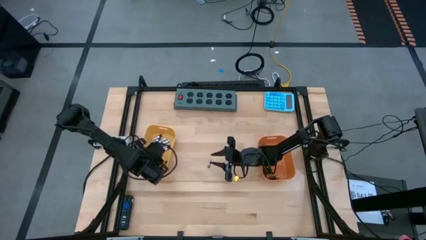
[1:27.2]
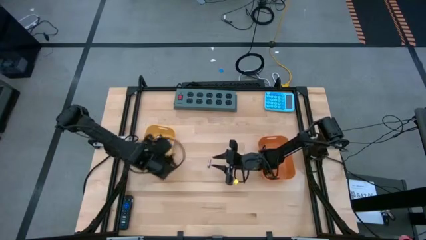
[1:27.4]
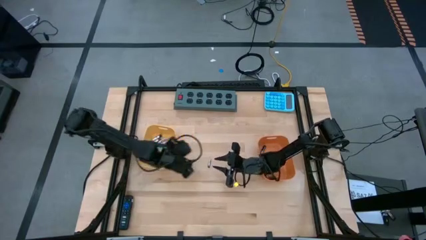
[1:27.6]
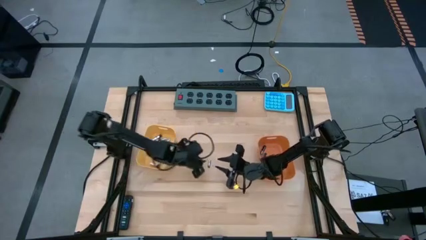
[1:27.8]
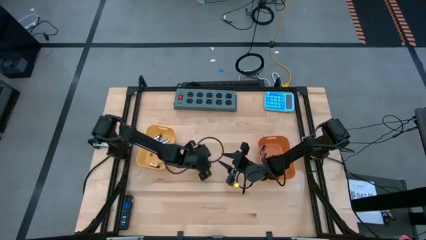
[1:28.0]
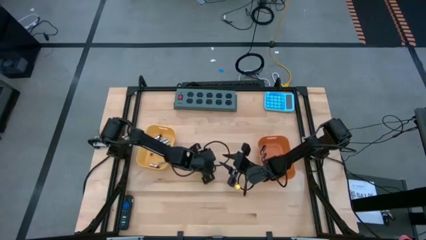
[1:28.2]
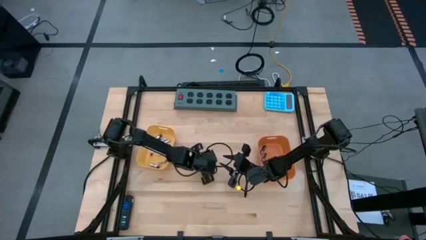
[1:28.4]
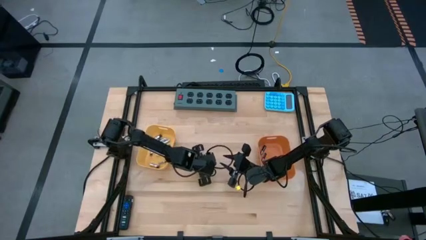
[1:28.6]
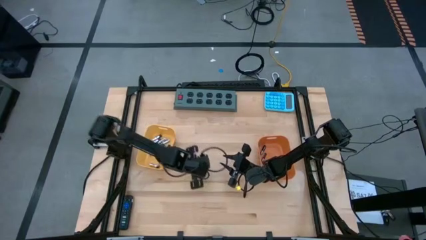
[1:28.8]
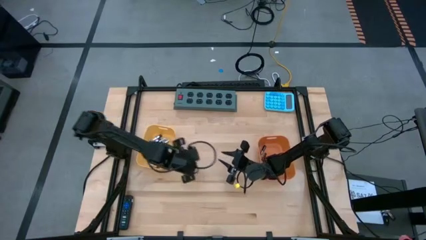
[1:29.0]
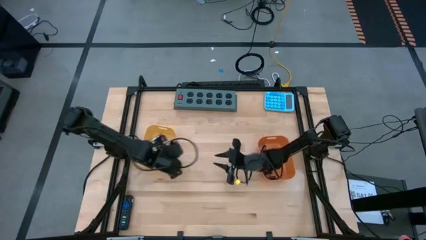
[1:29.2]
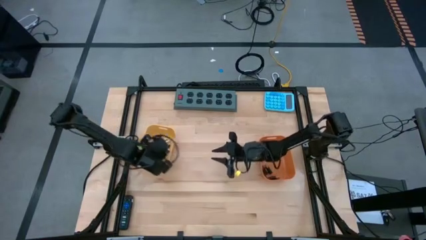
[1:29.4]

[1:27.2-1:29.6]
Task: Sort batteries
Put the silver battery into the yellow bin

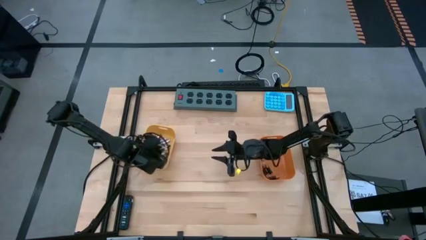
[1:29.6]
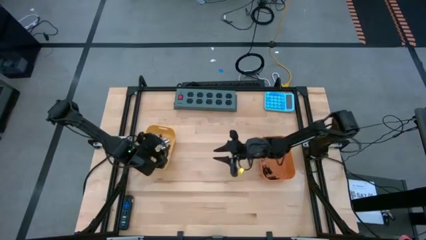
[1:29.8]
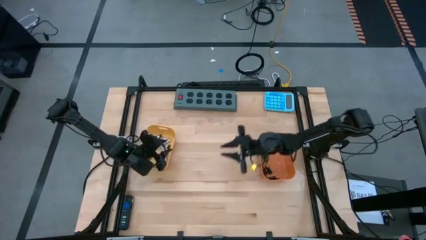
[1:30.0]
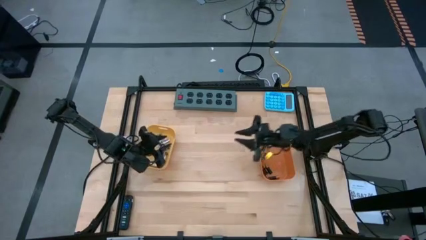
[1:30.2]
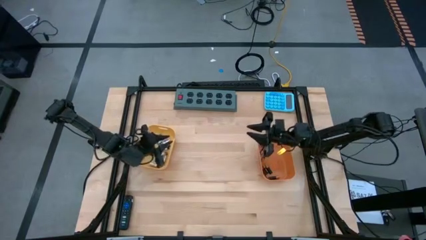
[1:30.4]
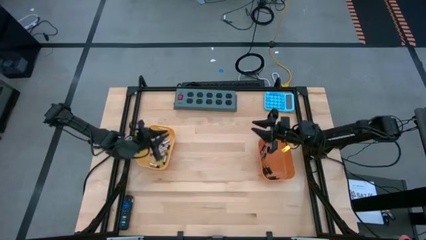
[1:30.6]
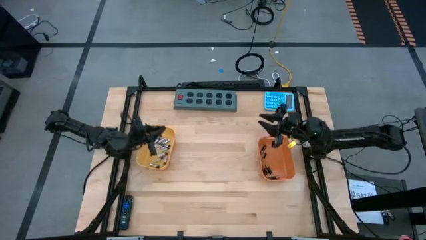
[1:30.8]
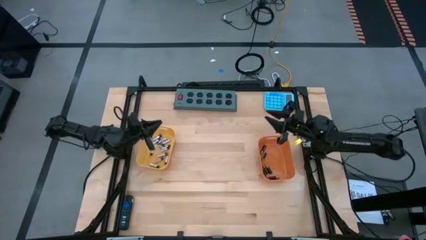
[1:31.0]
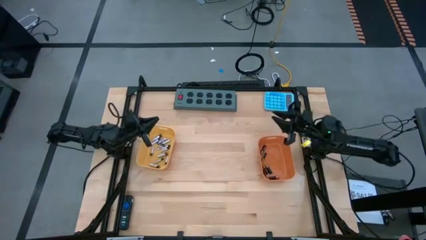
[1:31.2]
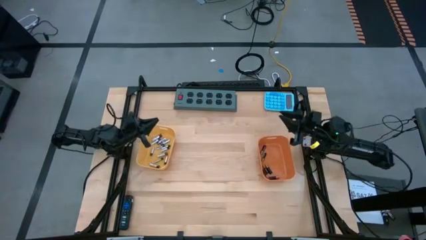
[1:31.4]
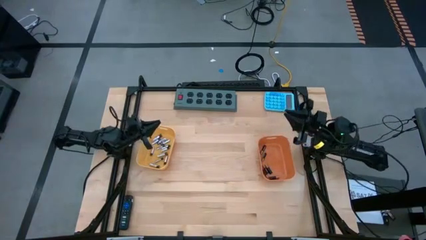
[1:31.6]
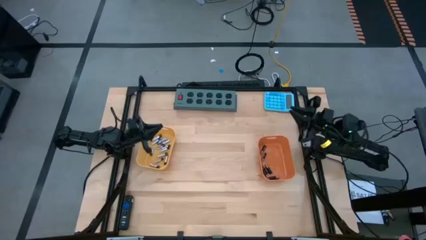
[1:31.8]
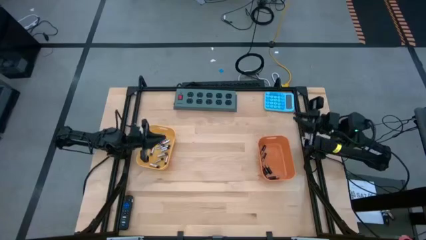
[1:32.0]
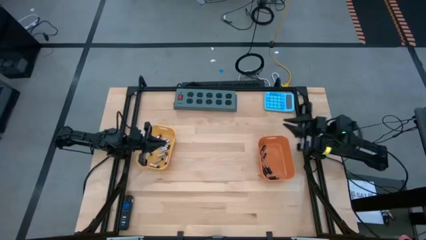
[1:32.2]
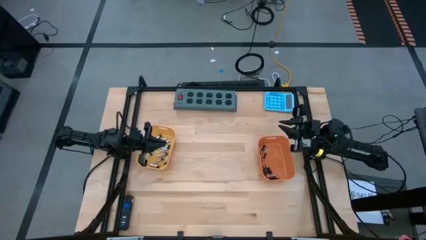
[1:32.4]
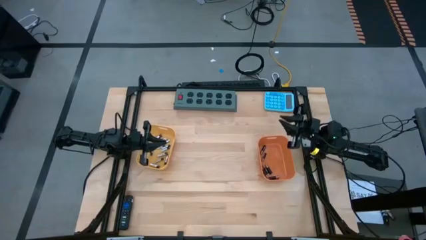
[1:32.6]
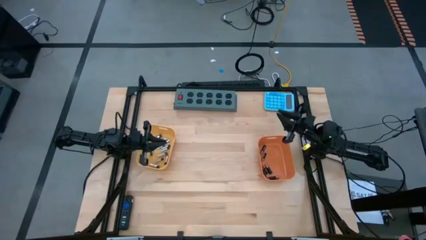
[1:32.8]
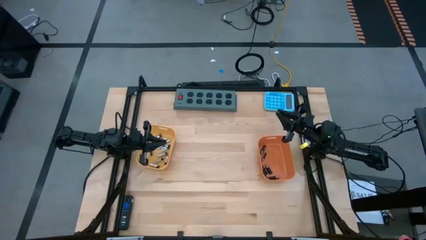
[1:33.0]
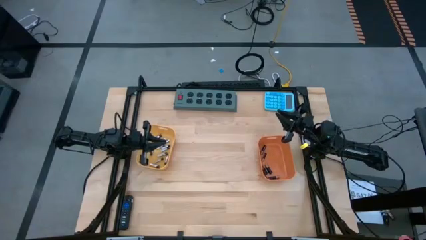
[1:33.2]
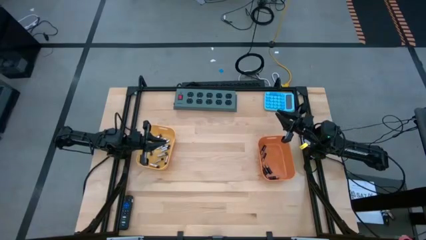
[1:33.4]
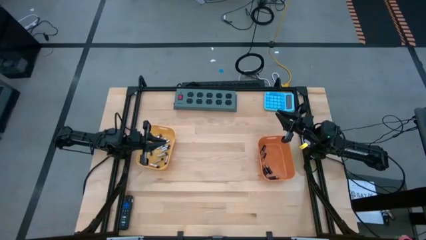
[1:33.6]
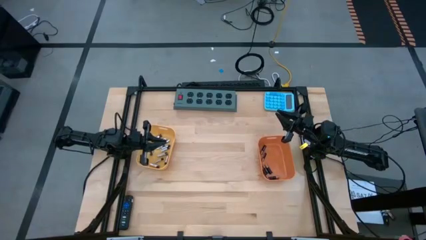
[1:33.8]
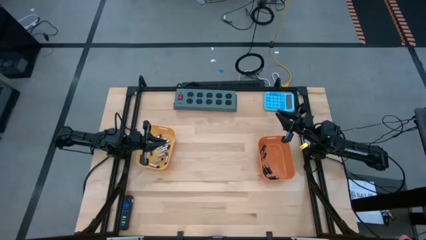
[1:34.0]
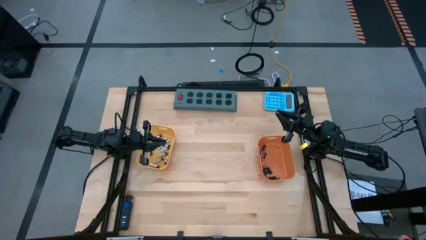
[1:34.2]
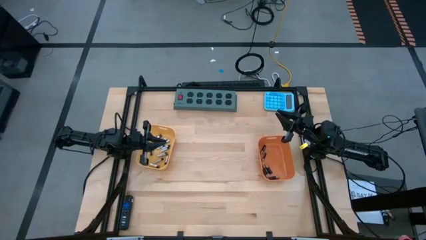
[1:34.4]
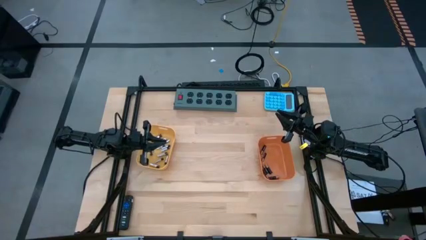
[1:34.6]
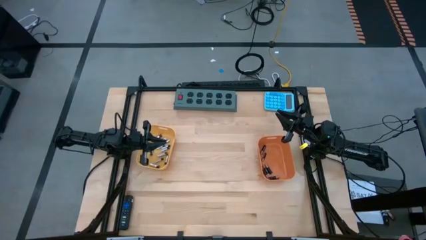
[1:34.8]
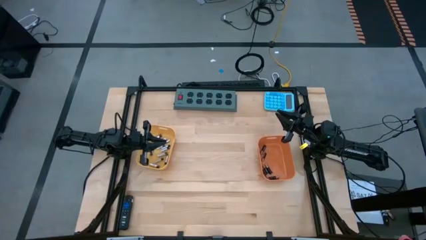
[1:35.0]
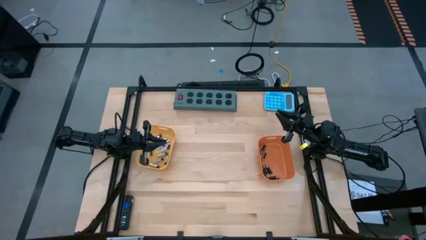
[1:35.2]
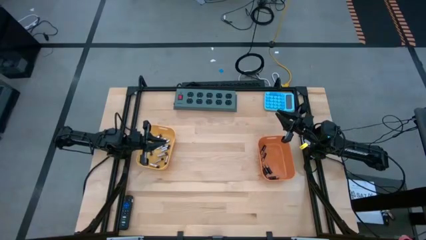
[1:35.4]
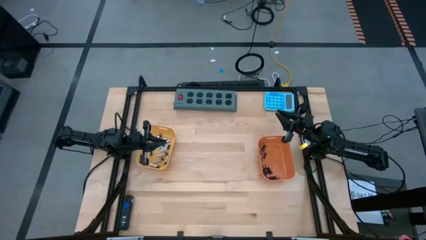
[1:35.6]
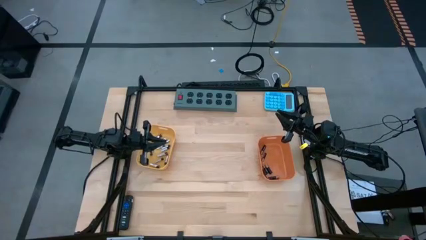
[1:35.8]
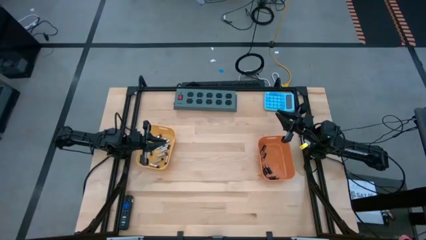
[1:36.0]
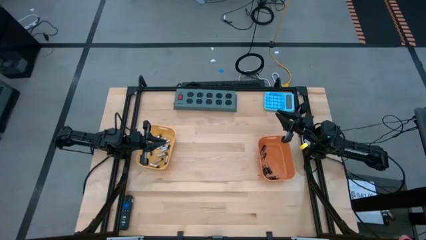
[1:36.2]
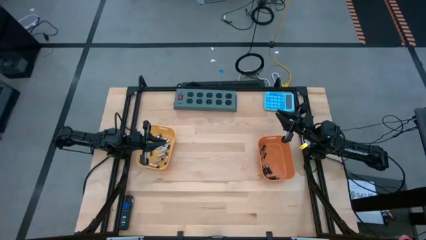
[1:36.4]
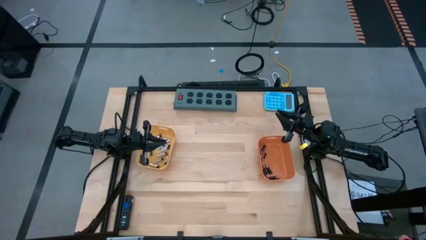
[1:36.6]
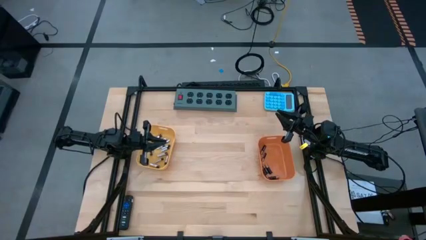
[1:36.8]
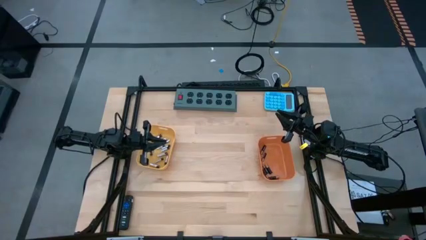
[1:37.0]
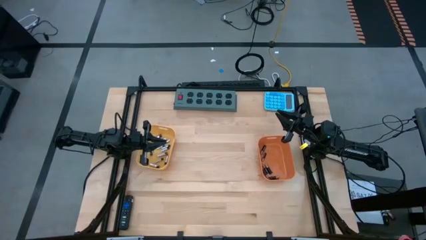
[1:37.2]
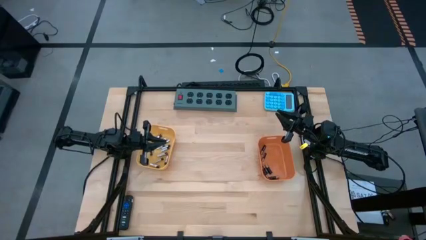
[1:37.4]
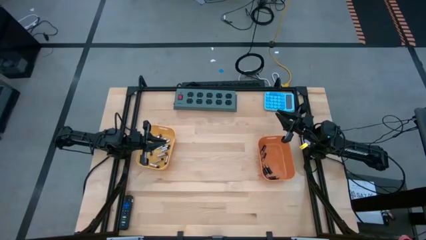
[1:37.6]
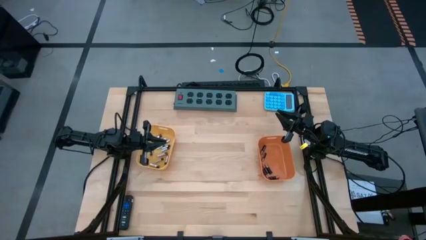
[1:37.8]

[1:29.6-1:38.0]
Return to Home Position

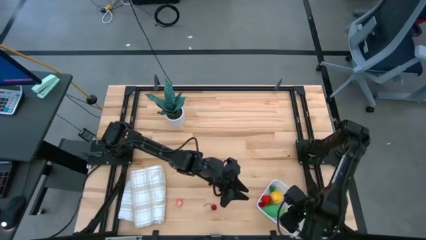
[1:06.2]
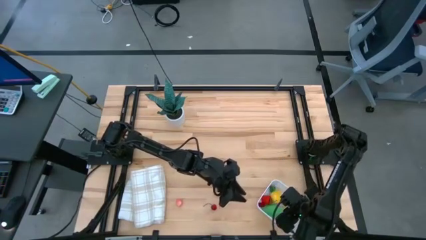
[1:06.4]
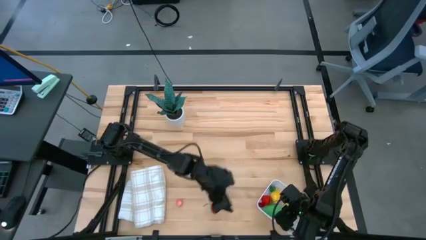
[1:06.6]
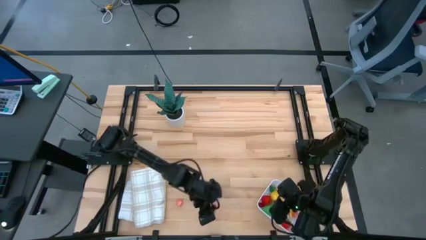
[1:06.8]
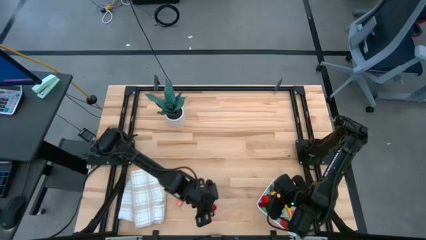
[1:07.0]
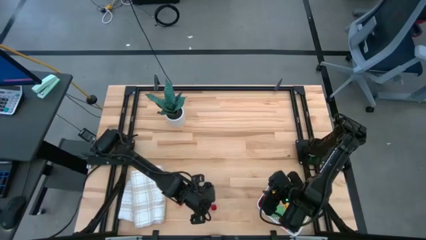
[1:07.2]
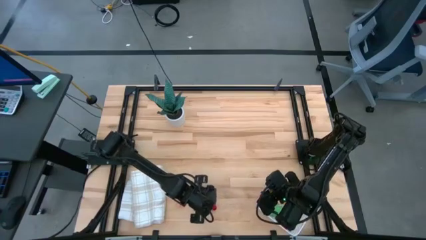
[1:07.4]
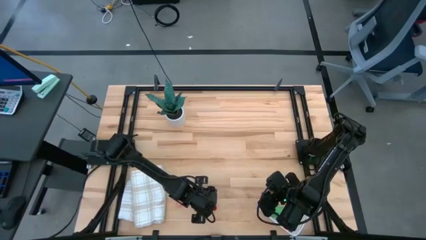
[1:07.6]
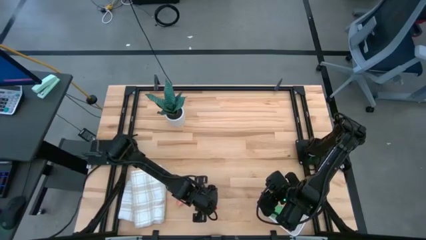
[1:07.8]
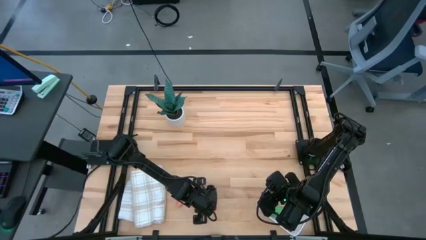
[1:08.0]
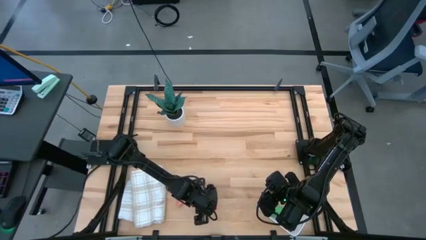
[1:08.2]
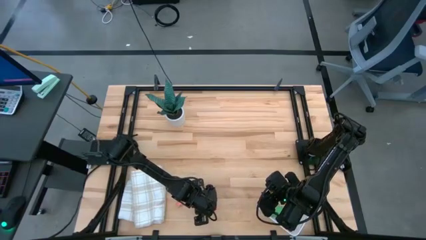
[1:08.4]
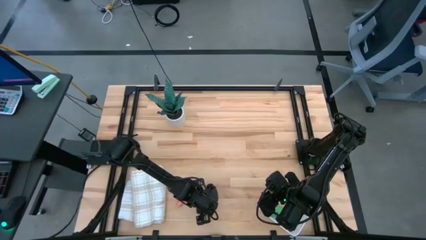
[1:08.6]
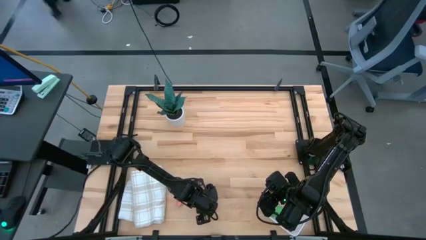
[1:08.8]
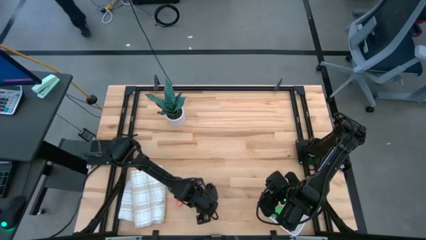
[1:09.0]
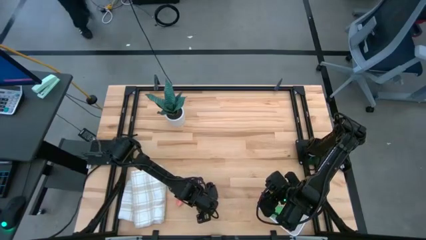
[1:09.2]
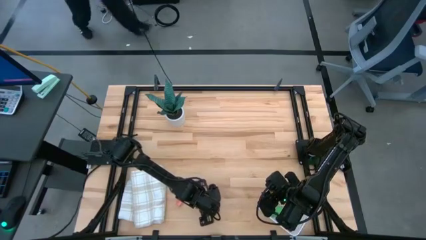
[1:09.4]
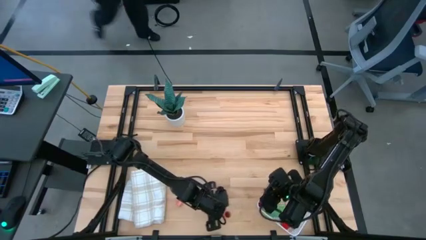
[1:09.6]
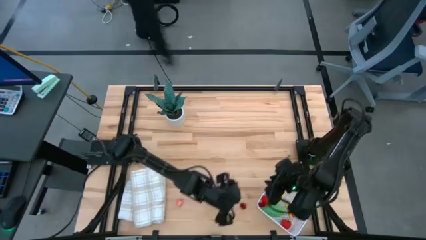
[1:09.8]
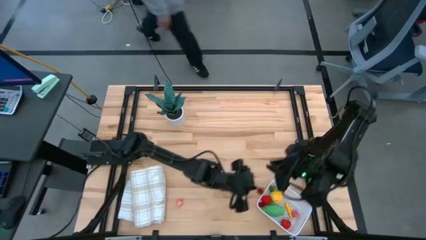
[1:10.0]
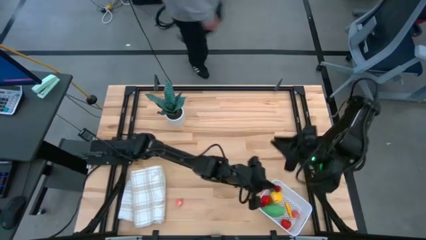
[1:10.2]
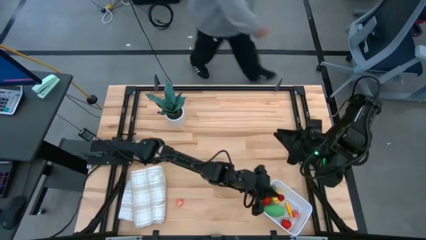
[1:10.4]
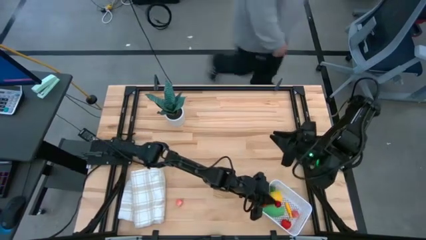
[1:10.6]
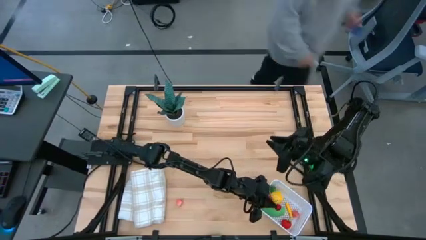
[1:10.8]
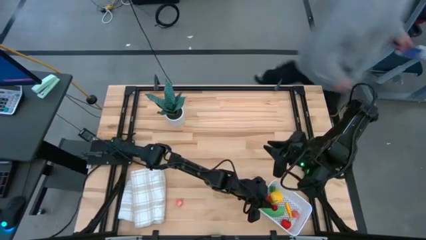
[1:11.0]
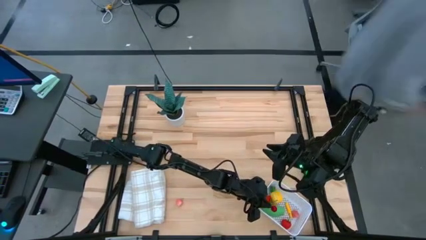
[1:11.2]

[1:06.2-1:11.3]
Task: Pick and placing Produce into tupperware
Put the red cherry into the white bin
